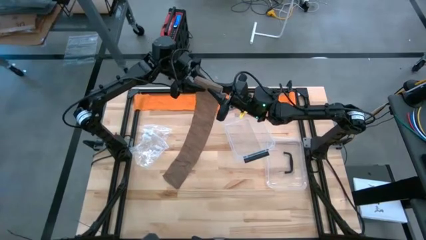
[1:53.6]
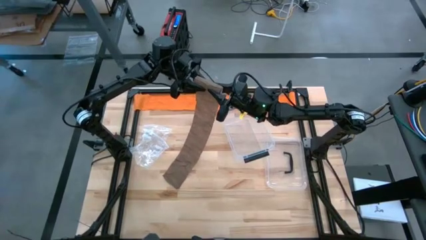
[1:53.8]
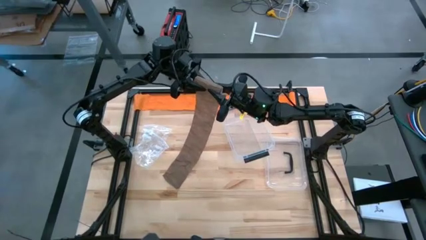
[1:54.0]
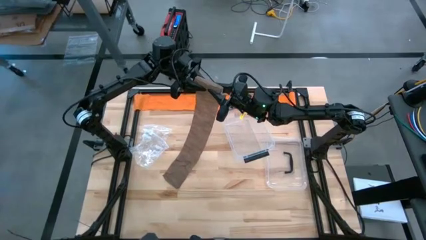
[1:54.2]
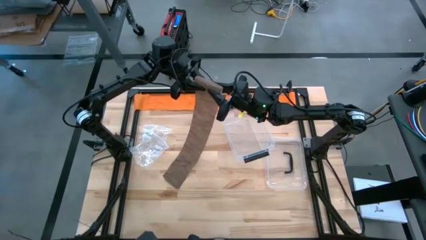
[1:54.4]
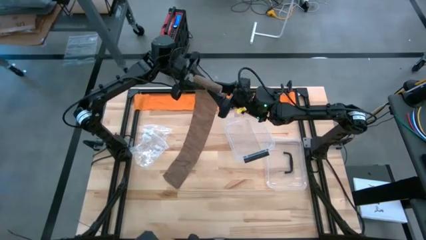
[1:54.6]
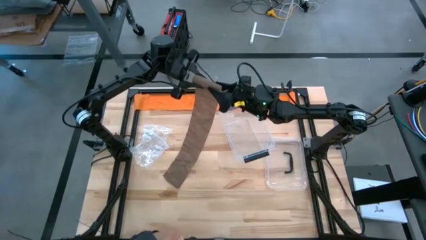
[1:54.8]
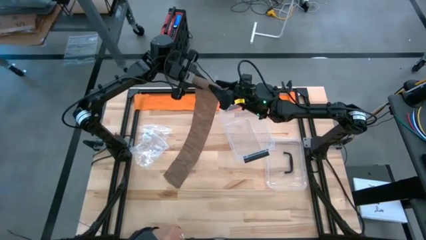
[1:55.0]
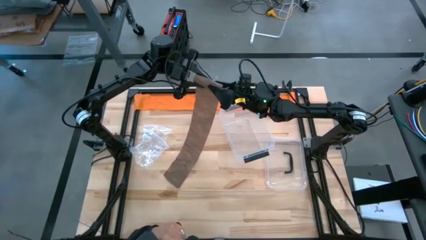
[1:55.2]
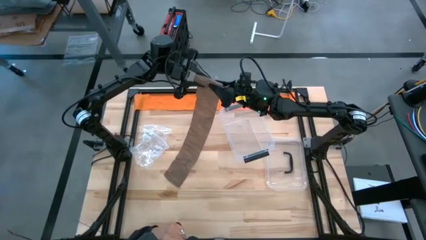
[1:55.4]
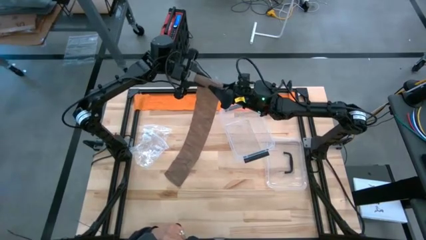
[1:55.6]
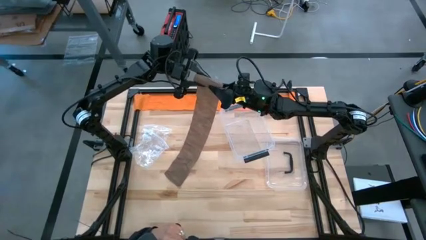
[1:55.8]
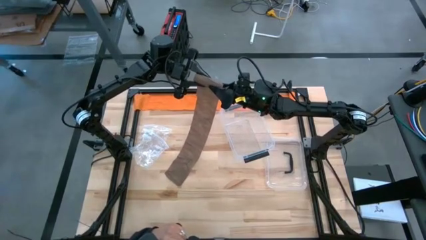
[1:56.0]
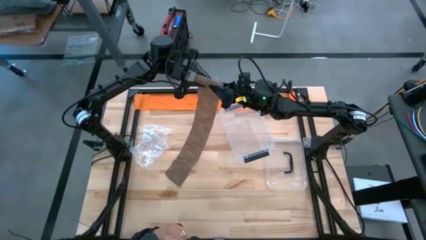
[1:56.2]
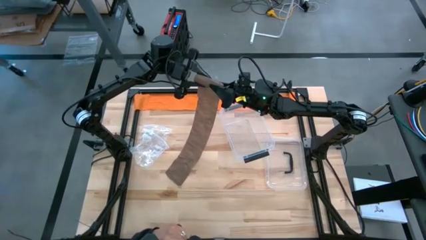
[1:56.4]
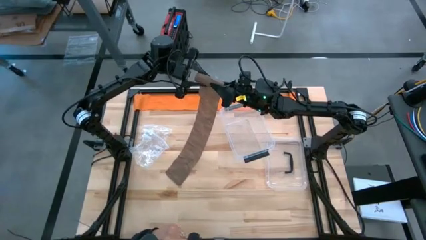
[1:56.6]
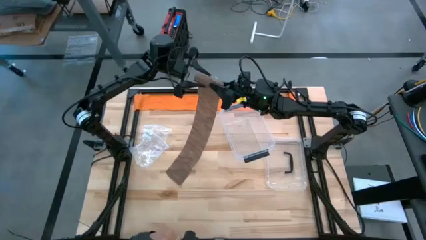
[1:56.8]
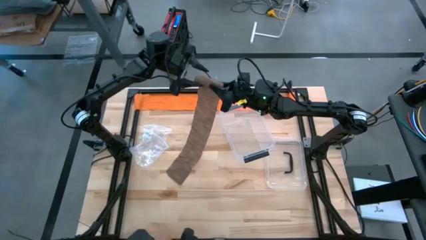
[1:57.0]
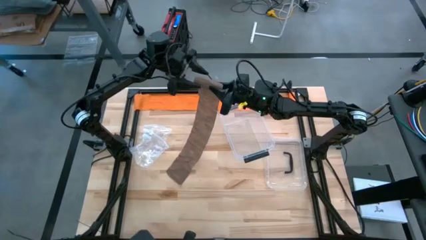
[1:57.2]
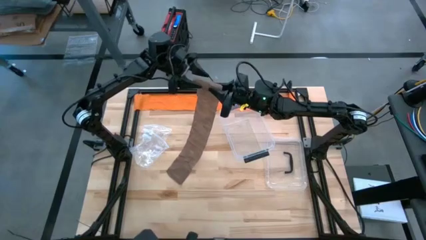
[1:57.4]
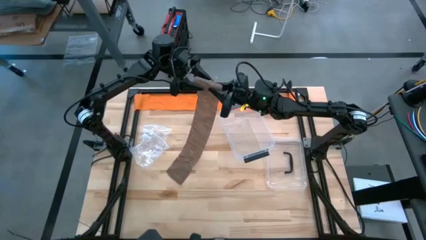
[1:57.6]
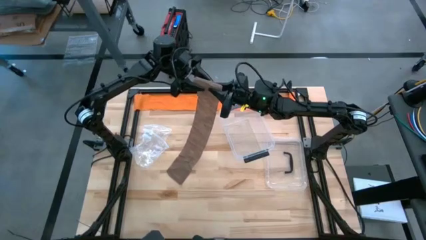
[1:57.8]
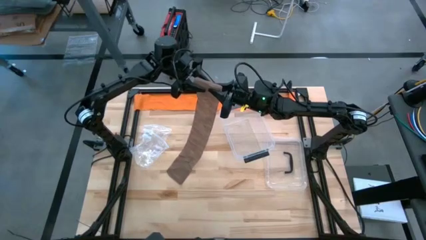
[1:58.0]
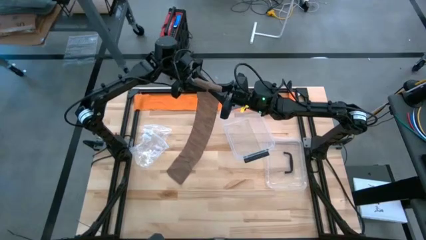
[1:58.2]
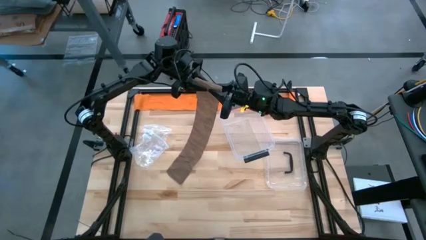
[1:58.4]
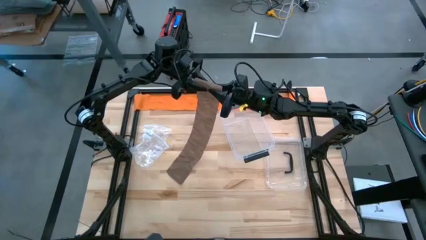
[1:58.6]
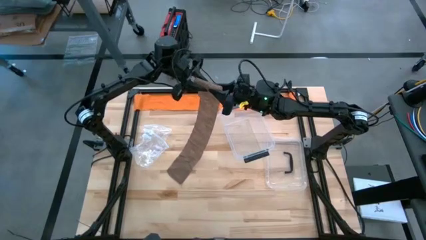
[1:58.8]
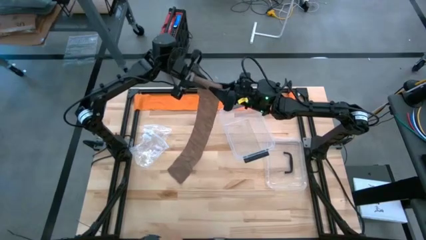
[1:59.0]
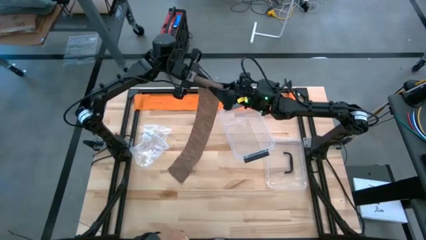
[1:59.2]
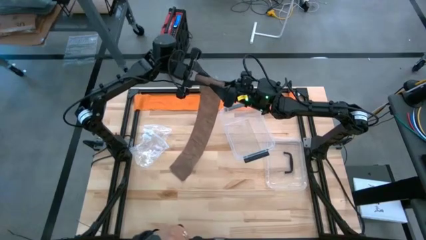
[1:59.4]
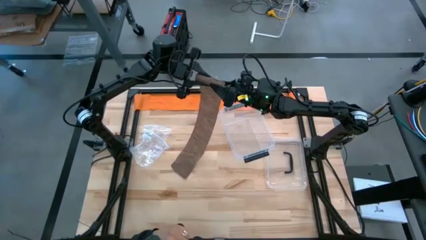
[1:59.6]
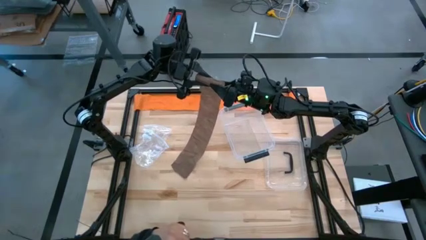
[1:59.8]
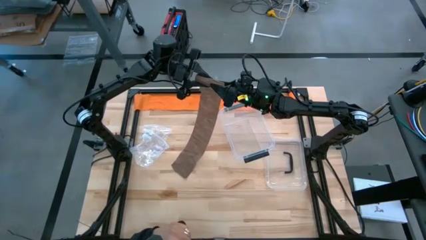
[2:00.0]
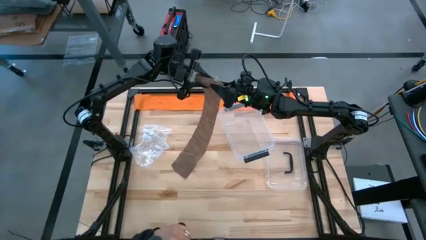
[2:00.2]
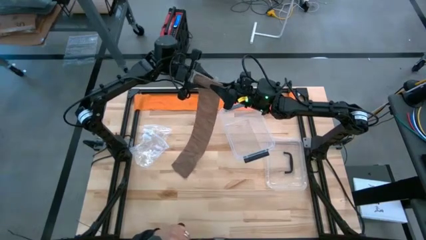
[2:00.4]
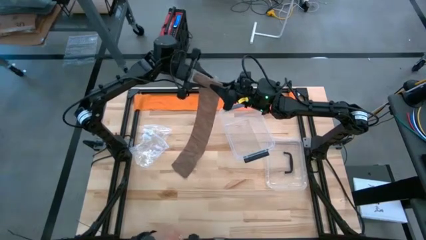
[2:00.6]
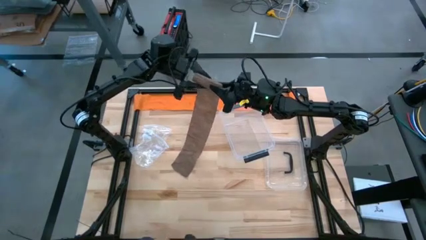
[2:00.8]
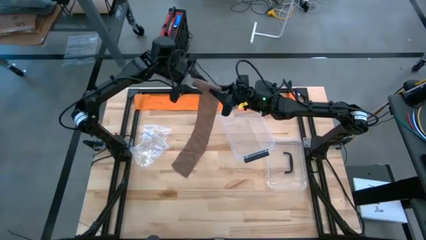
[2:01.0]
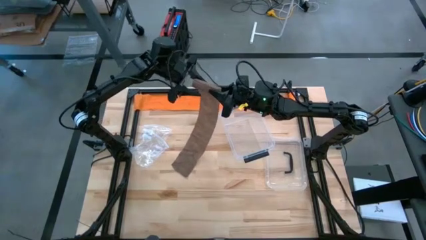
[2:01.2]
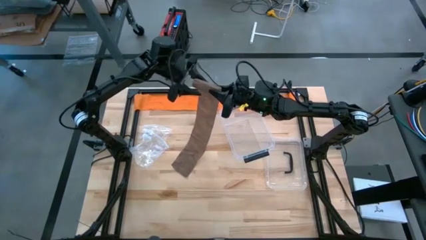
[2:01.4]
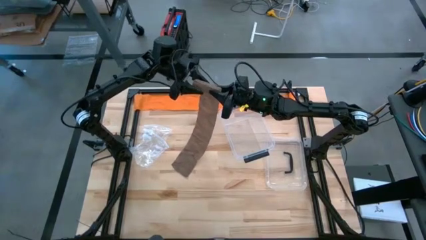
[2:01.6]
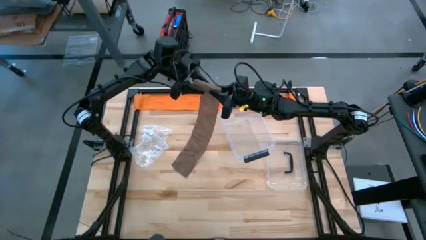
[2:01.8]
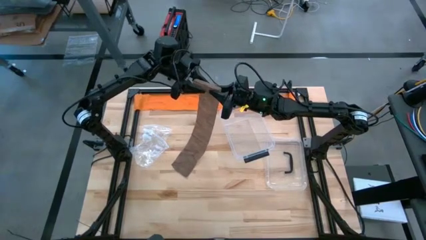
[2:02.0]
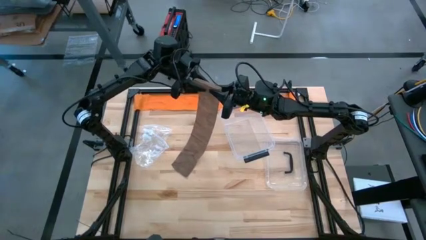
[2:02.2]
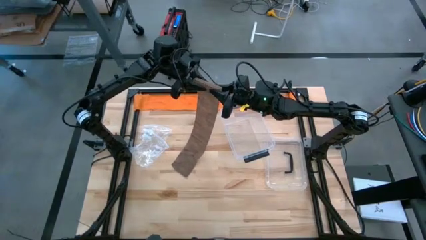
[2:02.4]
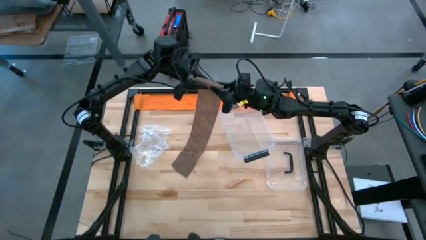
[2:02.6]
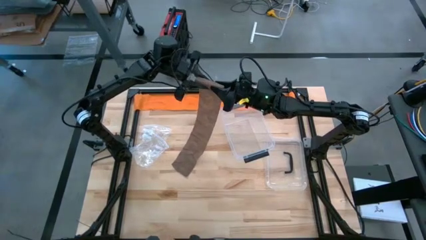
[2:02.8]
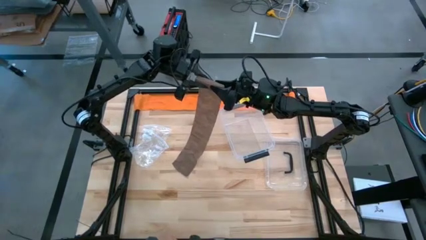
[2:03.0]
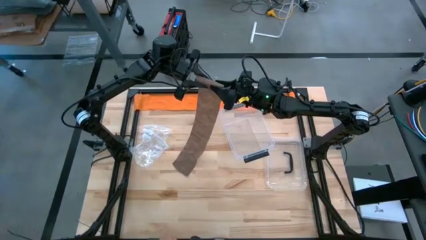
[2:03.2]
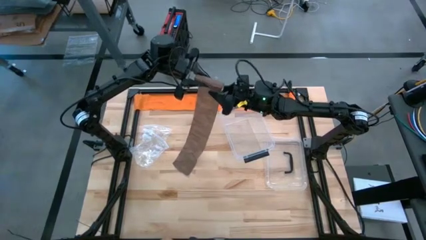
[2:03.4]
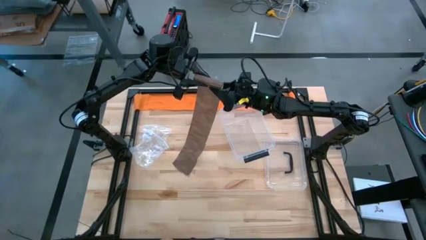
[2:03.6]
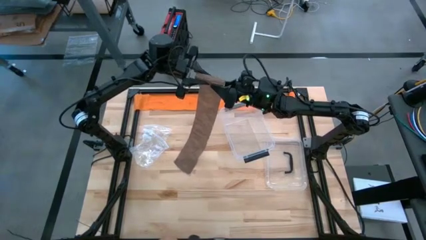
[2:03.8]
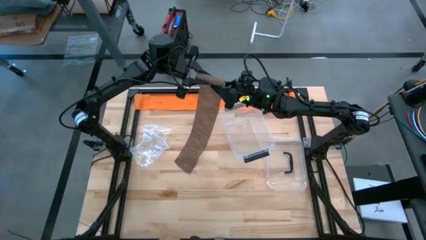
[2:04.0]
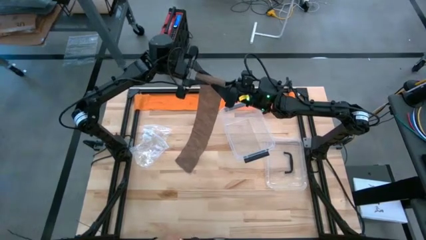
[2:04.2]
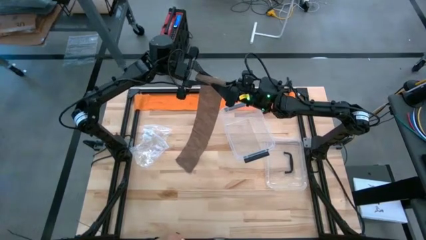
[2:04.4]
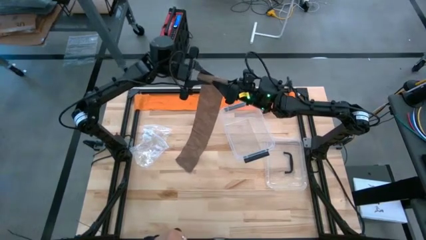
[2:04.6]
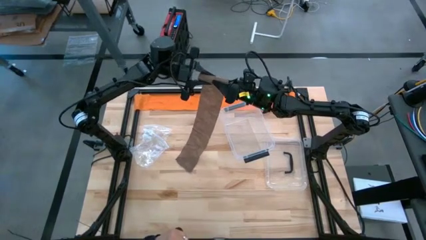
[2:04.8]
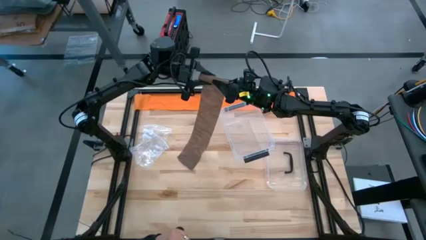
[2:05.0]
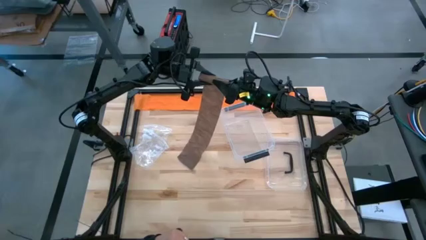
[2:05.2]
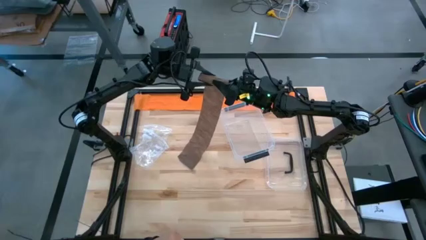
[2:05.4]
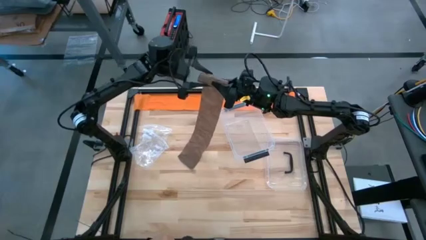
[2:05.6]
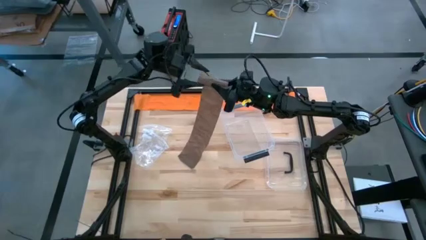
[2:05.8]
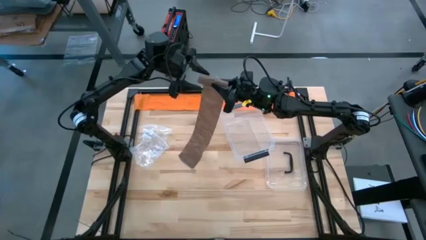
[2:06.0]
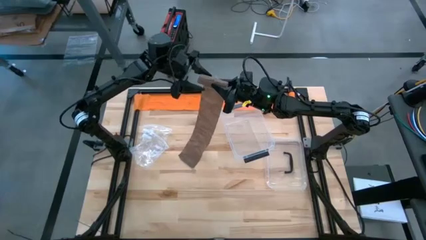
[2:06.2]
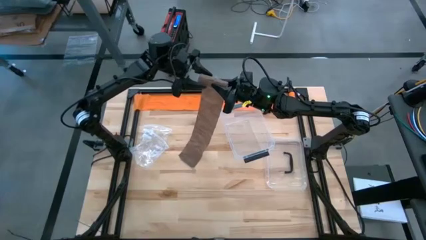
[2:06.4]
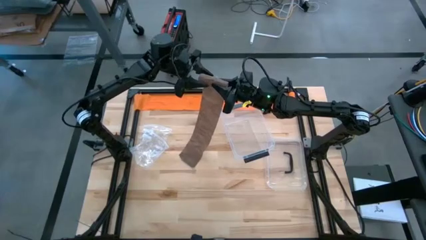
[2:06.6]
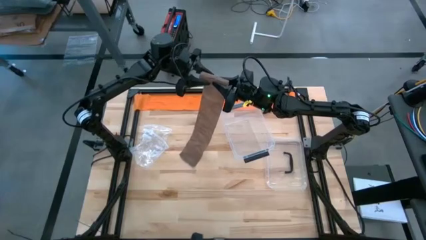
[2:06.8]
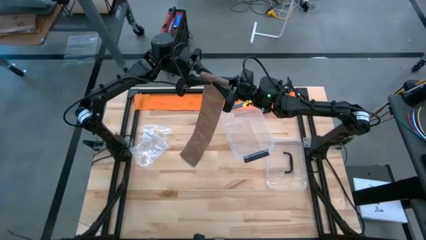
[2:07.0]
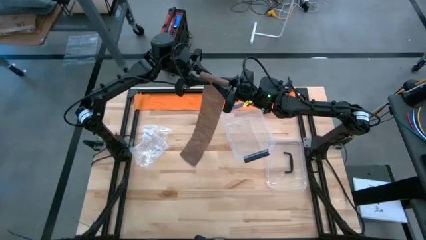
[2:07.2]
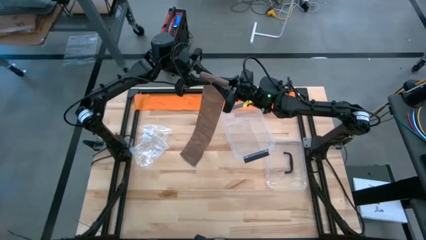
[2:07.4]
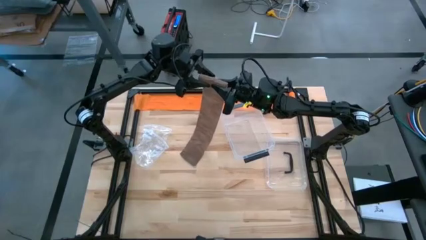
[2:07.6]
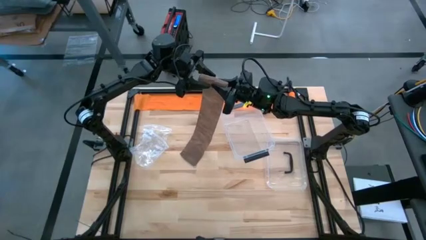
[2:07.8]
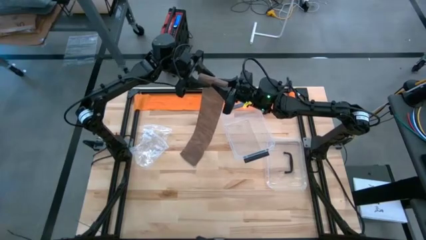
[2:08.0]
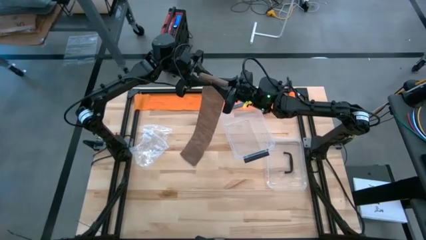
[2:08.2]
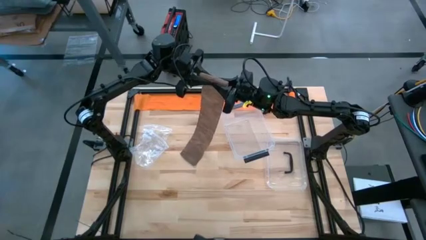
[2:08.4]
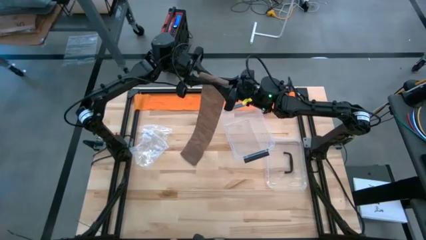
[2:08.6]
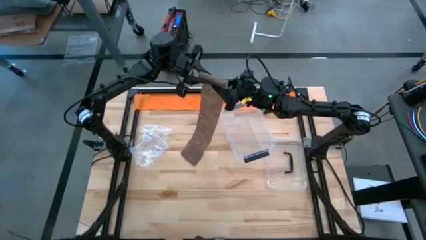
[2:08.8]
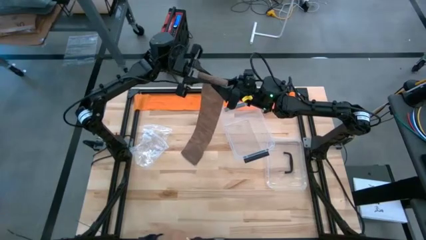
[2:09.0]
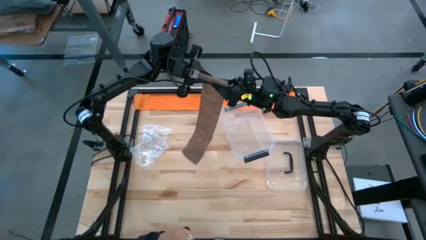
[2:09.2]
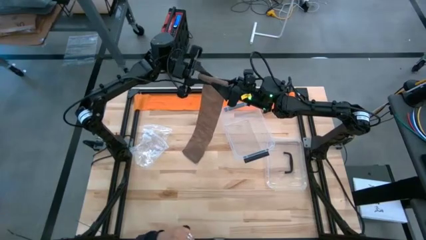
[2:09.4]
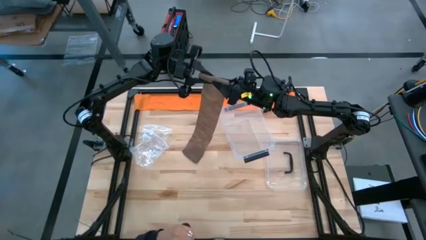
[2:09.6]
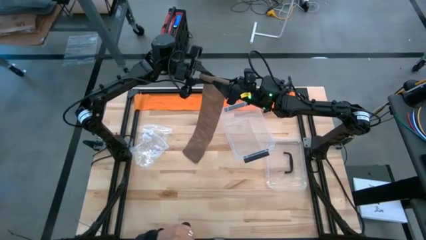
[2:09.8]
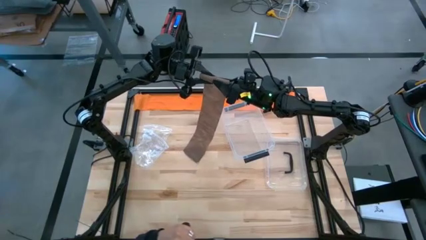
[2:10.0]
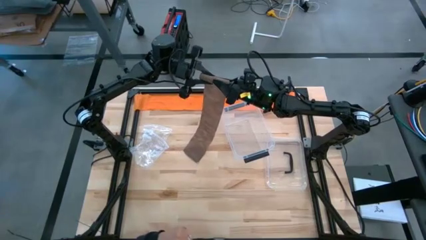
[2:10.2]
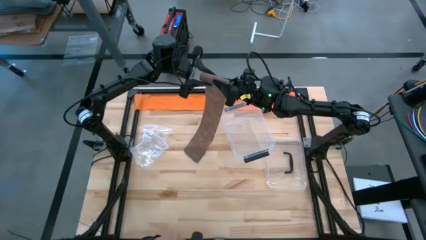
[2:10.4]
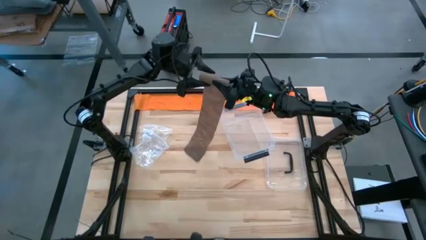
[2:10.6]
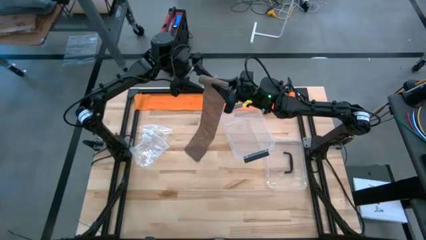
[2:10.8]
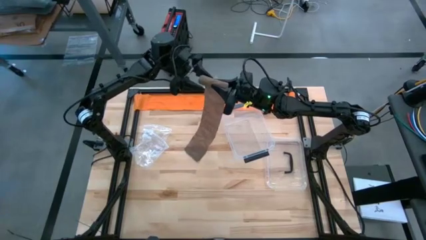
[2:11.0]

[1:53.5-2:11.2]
Task: Roll bandage
Roll the brown bandage
